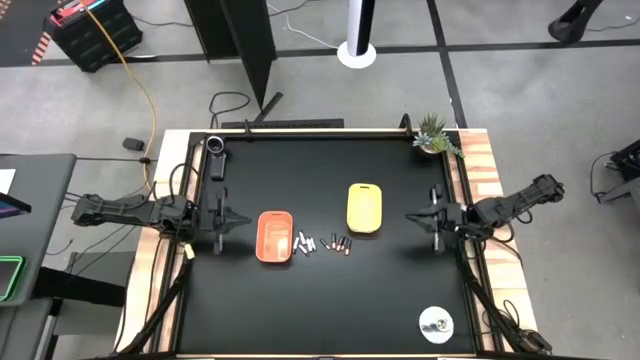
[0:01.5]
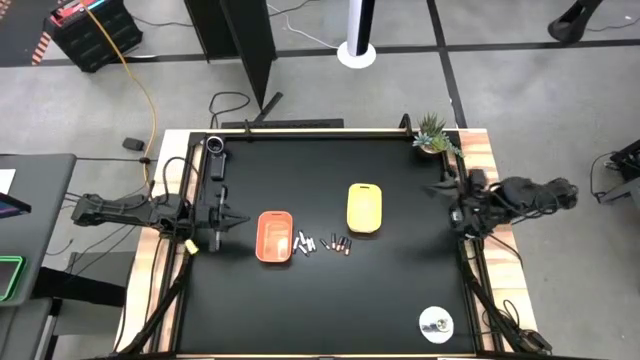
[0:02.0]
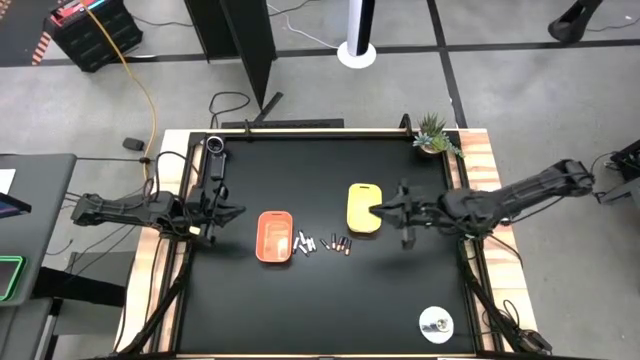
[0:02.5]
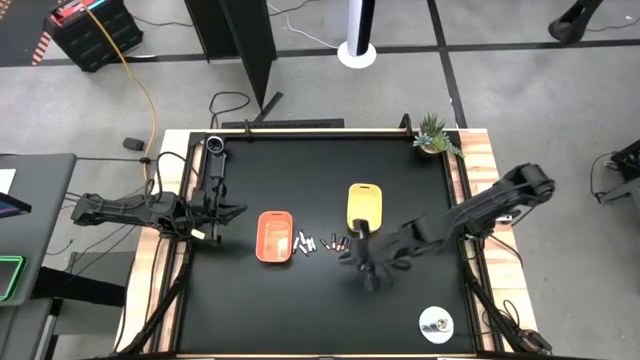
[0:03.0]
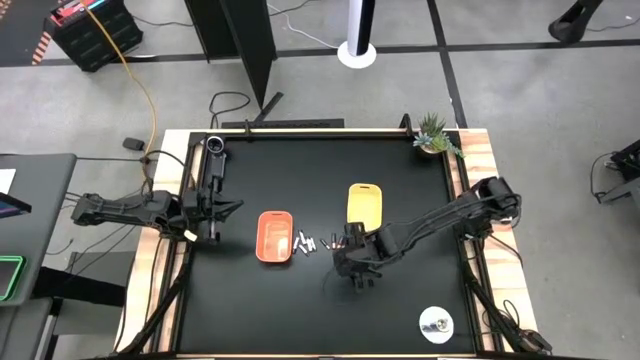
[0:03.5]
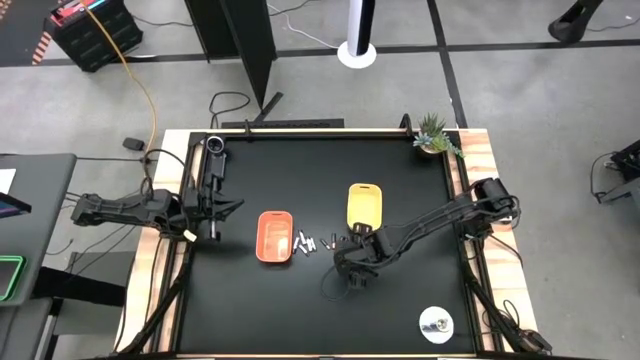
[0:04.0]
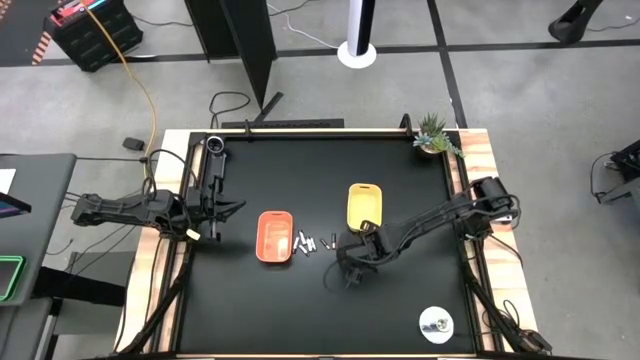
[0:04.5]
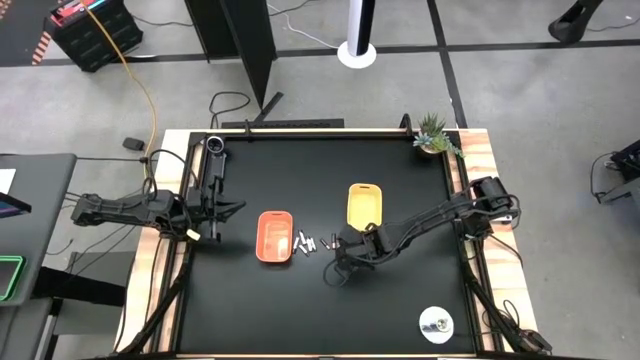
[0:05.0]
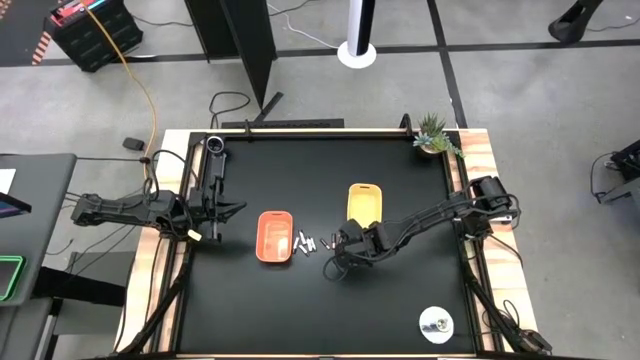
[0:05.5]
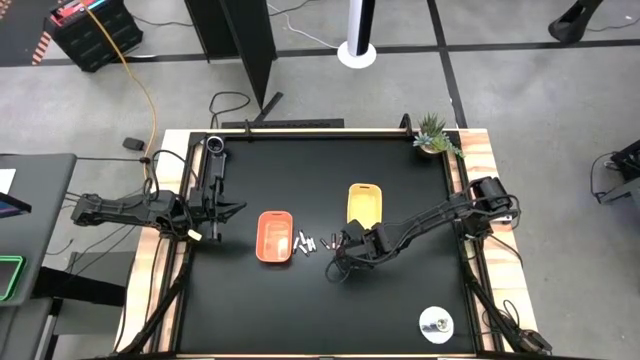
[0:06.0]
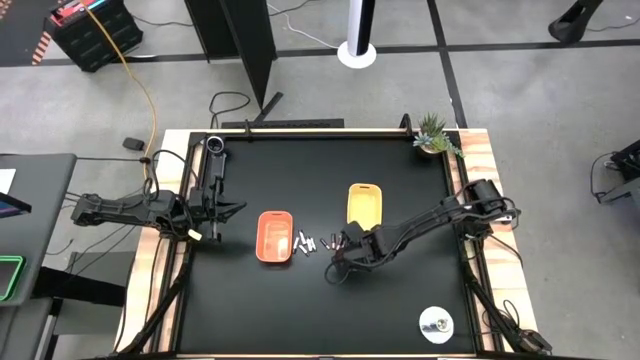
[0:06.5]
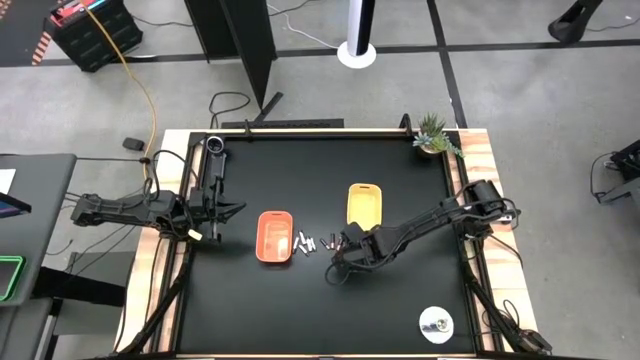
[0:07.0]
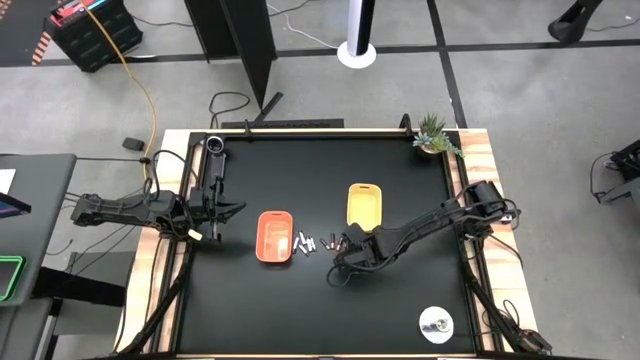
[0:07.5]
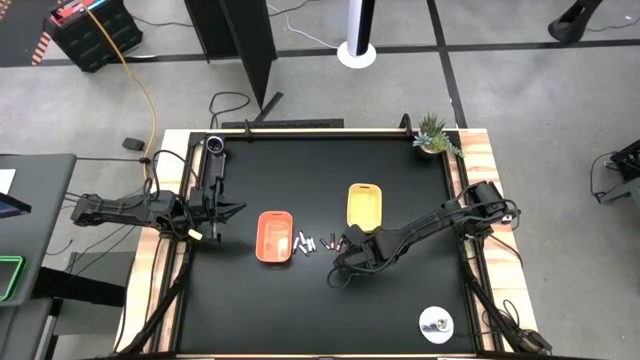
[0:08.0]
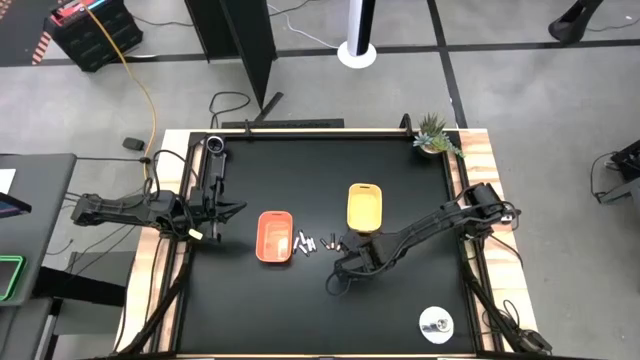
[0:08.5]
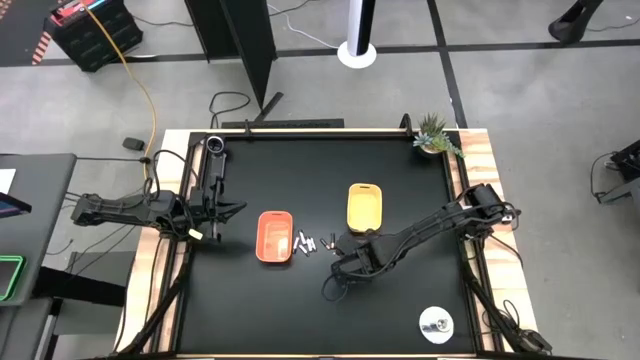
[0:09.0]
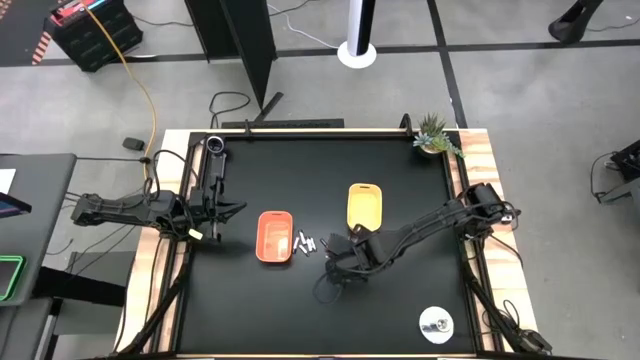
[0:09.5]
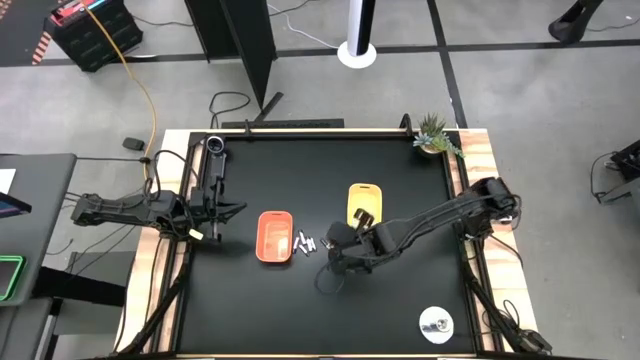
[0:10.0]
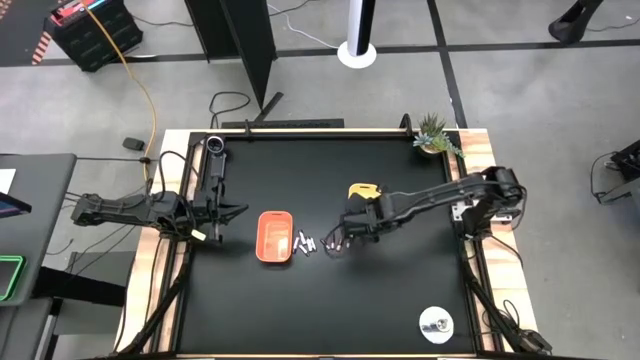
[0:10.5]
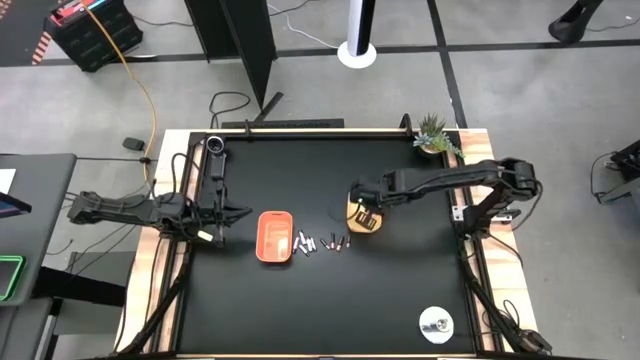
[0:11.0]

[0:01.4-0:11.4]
Task: Sort batteries
Put the big brown battery into the yellow bin

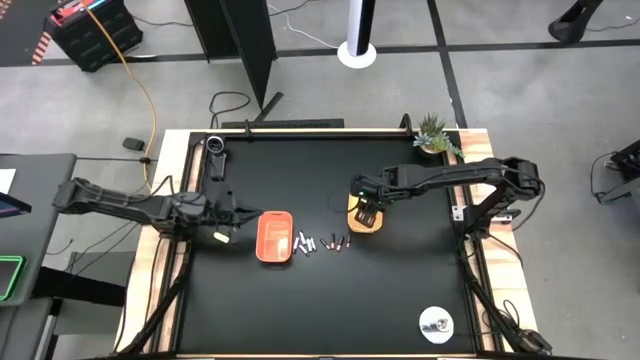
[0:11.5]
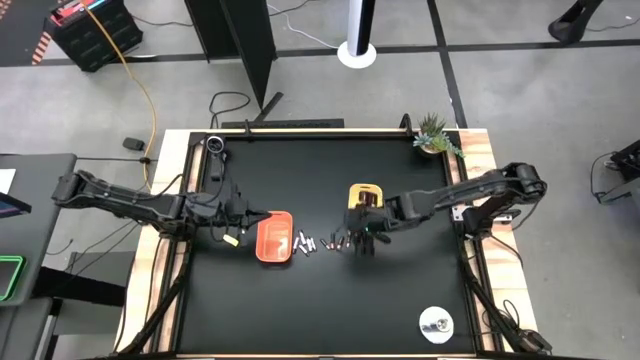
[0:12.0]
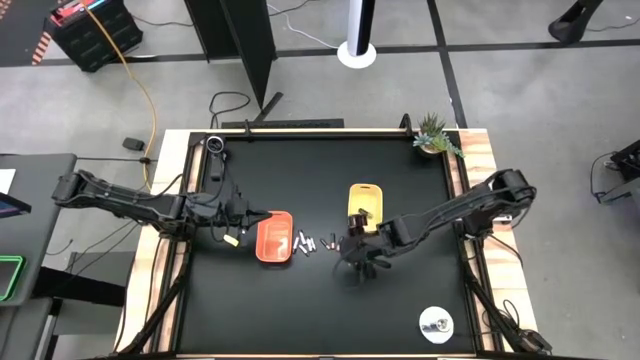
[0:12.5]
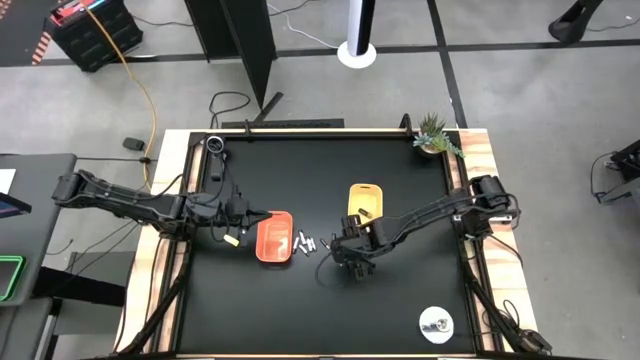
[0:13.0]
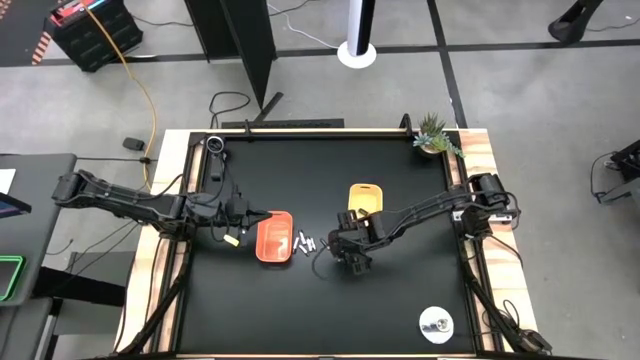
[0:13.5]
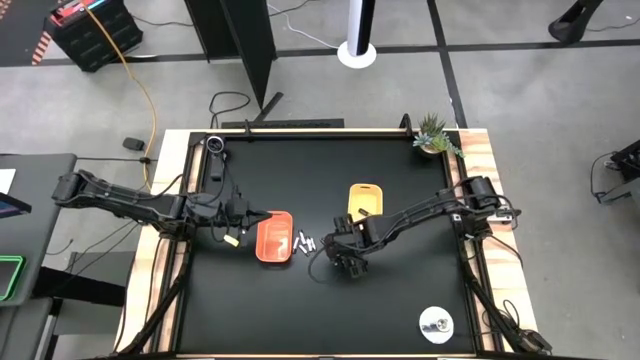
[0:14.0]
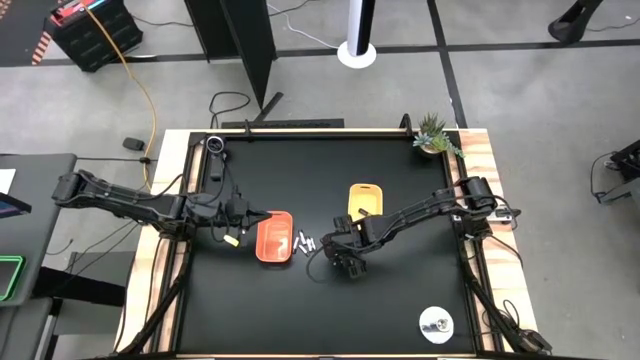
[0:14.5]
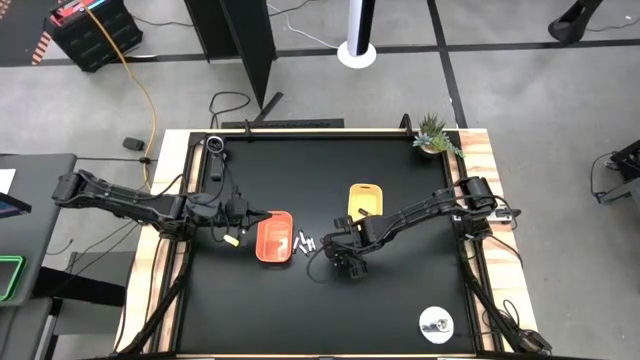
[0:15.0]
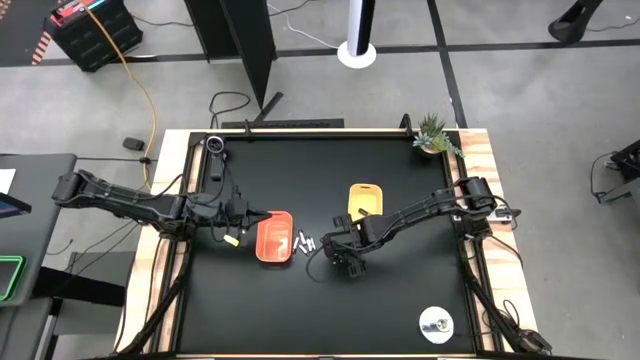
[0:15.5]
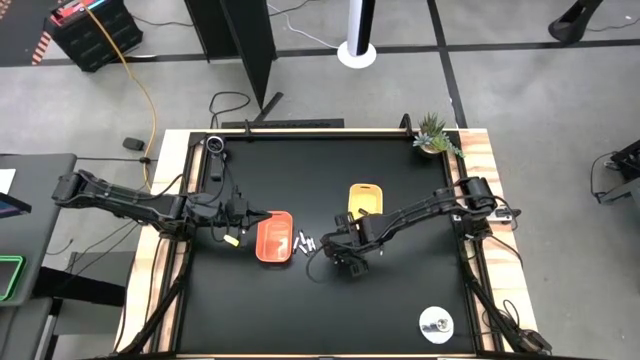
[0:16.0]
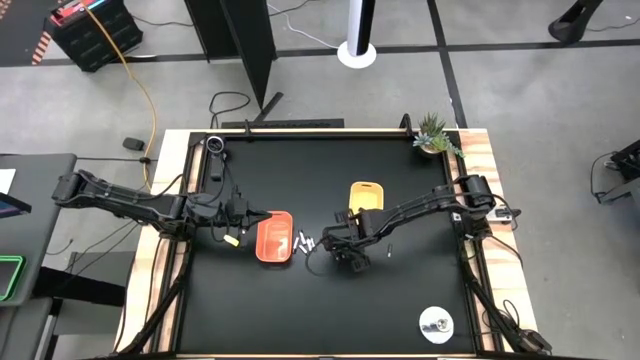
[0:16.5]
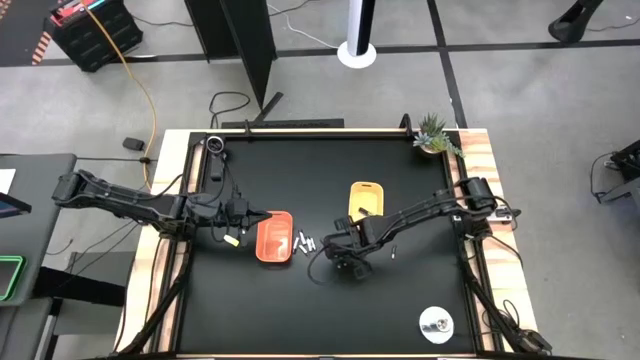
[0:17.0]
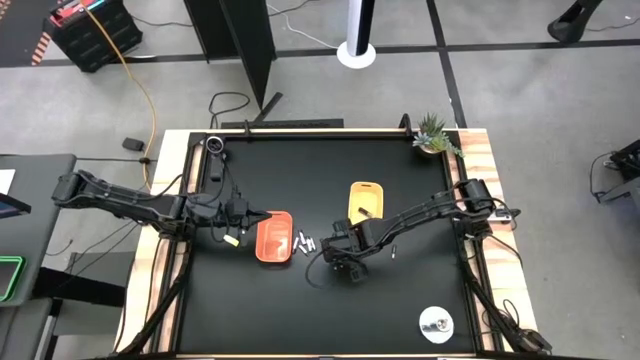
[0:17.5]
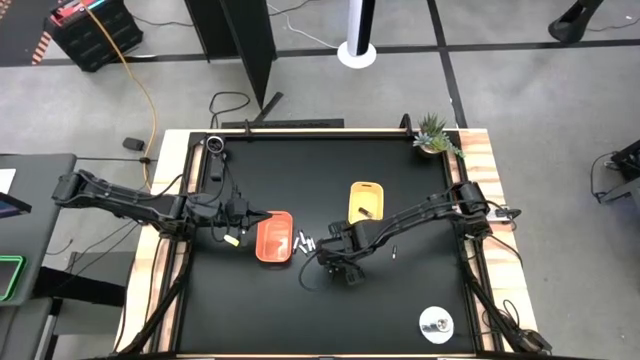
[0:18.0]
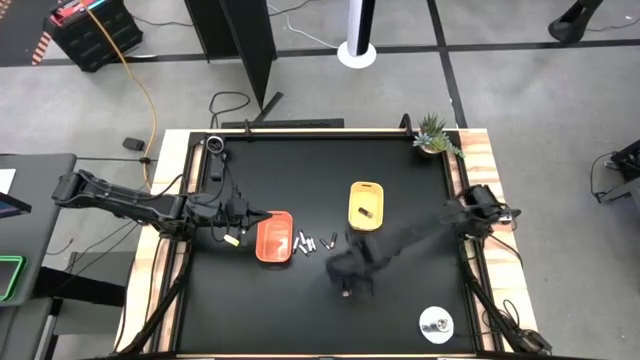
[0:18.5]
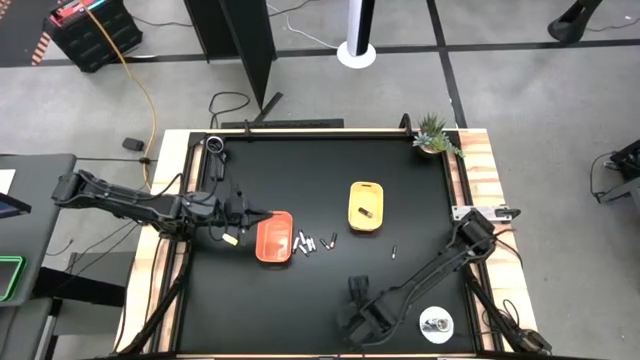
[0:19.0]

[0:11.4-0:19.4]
Put the big brown battery into the yellow bin

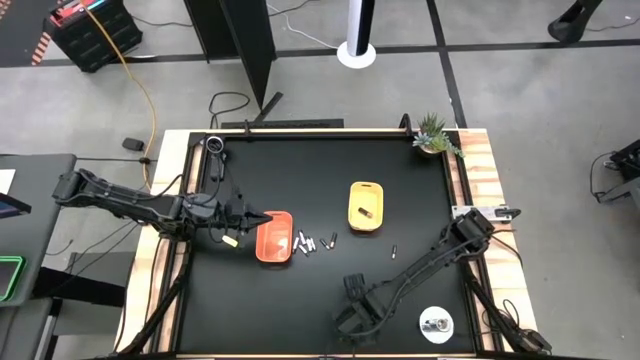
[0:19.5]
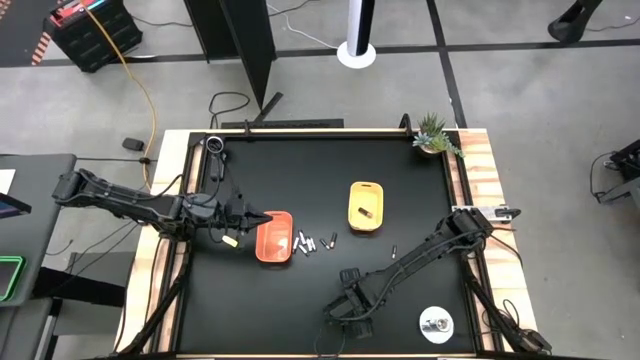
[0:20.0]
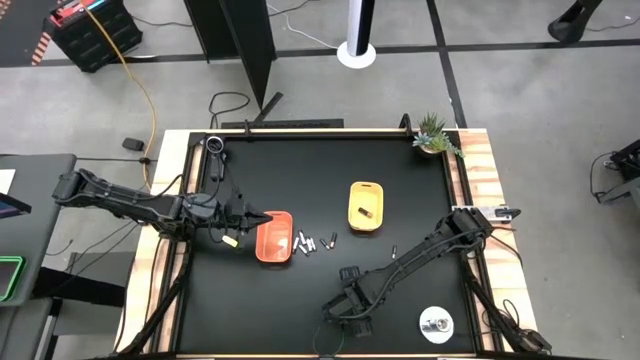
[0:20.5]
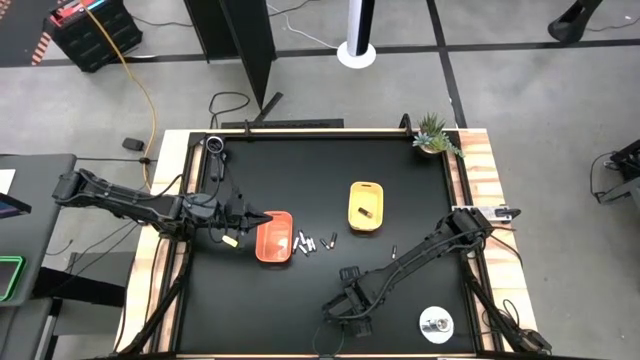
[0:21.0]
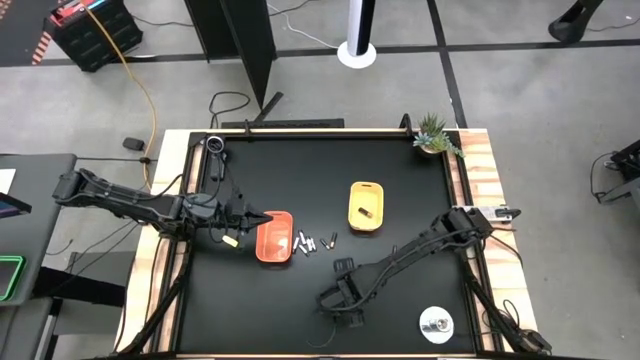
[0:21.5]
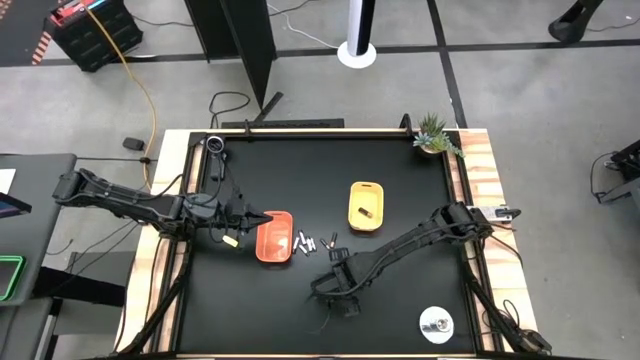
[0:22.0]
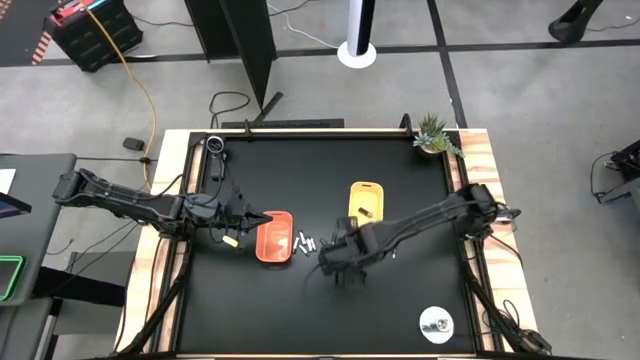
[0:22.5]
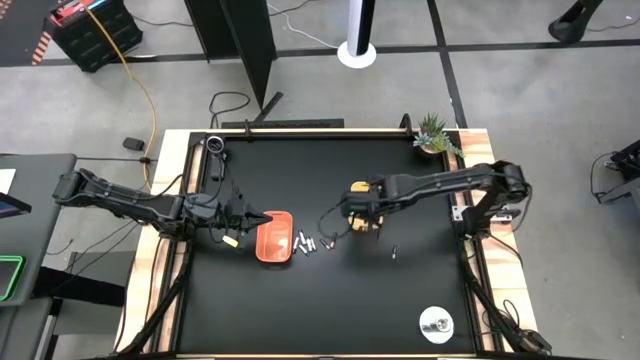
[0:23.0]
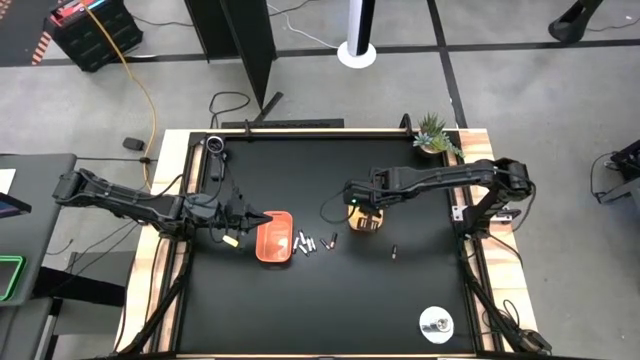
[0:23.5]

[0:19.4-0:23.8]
Put the big brown battery into the yellow bin
